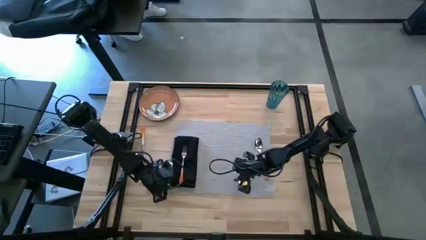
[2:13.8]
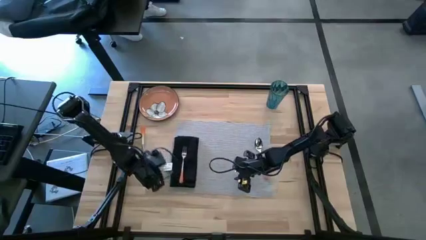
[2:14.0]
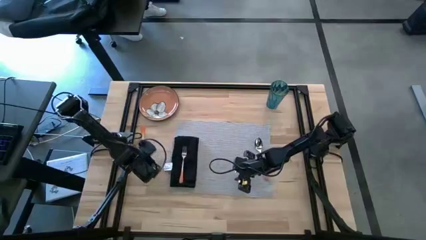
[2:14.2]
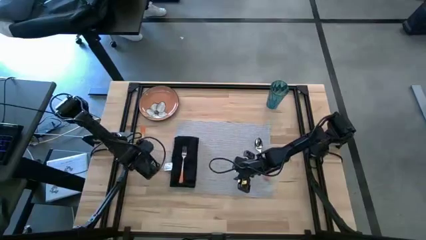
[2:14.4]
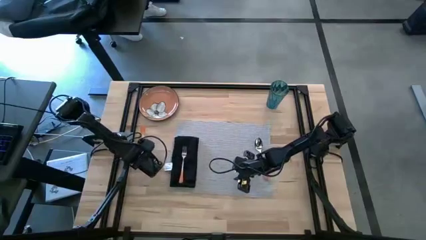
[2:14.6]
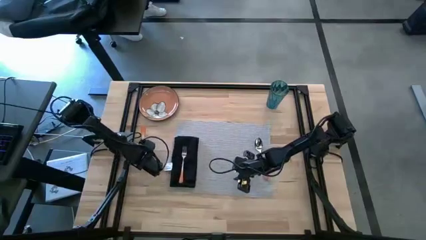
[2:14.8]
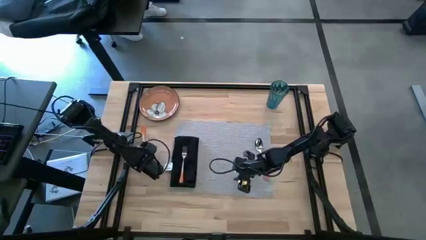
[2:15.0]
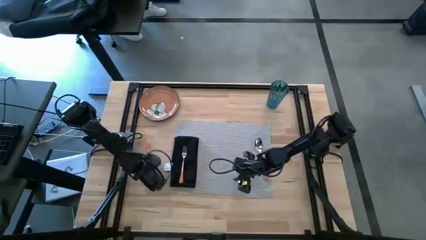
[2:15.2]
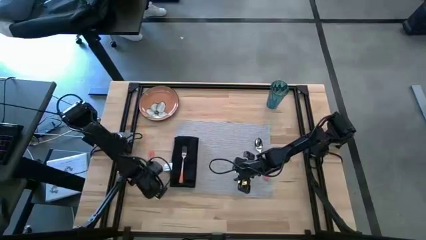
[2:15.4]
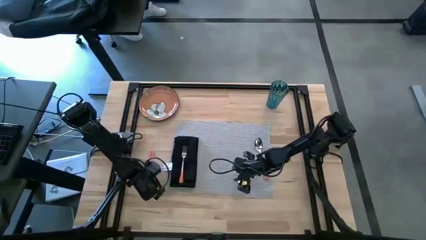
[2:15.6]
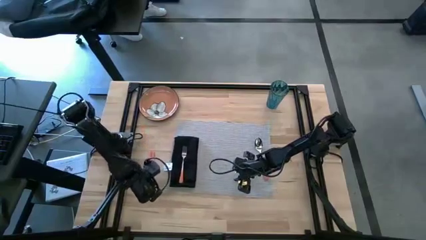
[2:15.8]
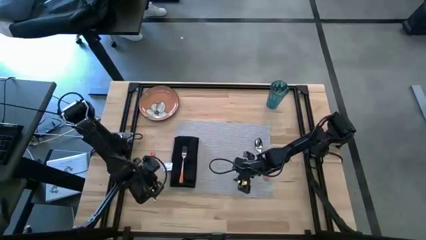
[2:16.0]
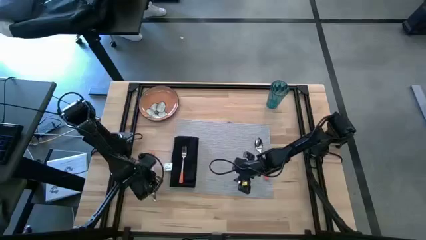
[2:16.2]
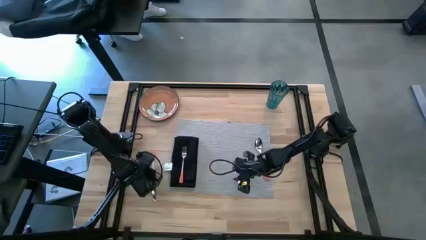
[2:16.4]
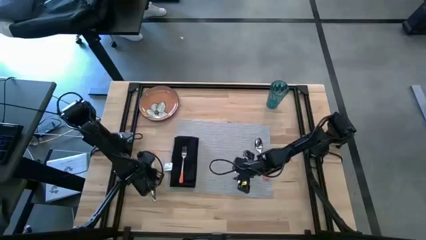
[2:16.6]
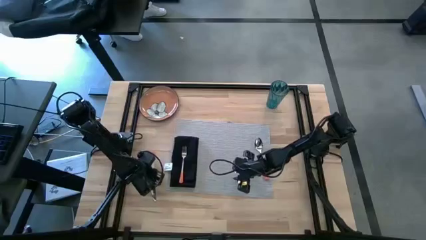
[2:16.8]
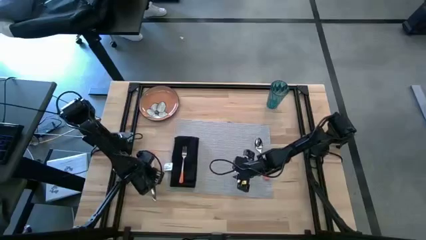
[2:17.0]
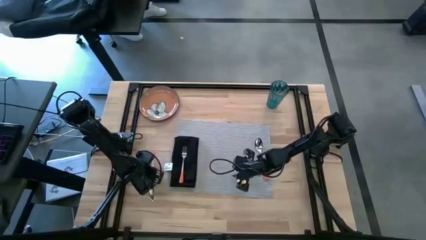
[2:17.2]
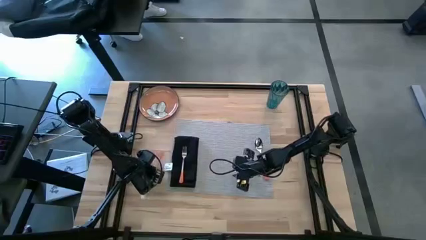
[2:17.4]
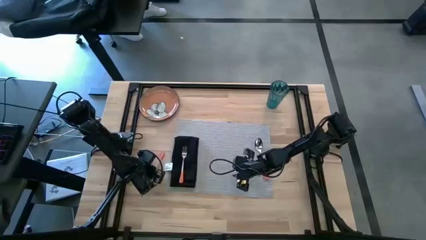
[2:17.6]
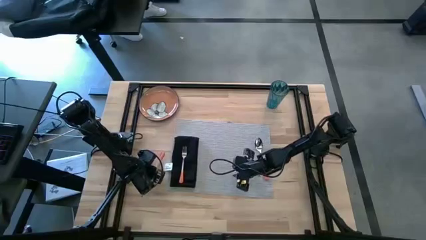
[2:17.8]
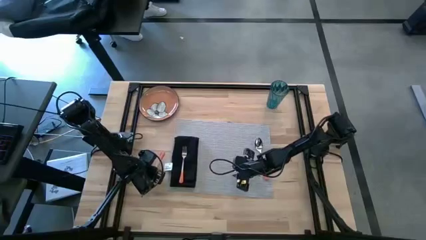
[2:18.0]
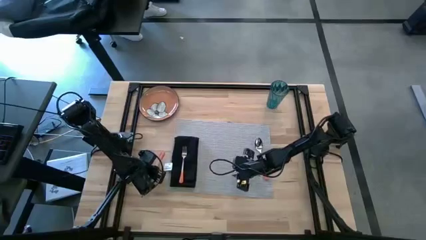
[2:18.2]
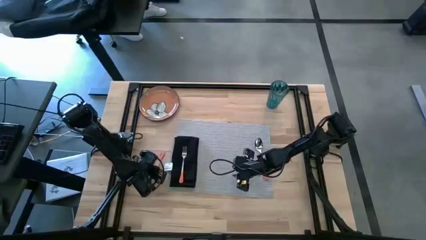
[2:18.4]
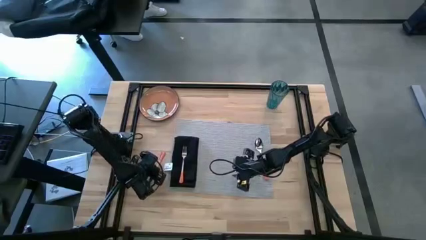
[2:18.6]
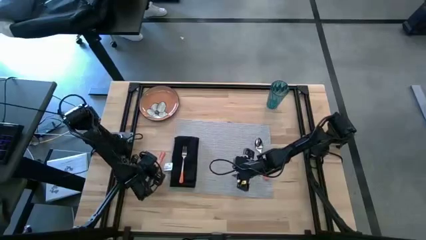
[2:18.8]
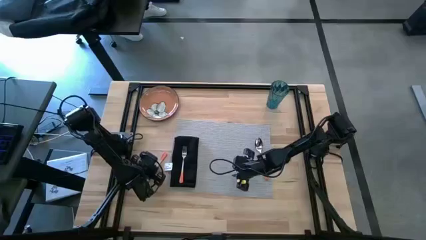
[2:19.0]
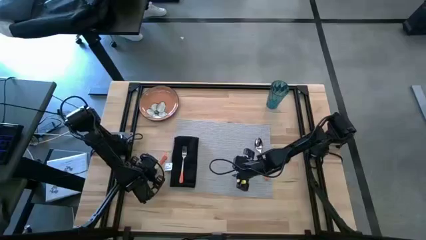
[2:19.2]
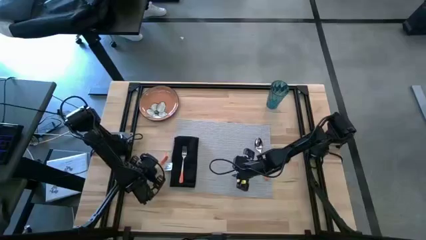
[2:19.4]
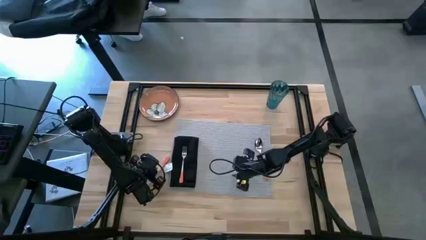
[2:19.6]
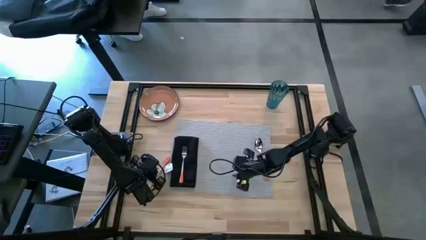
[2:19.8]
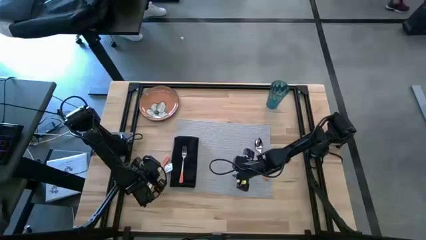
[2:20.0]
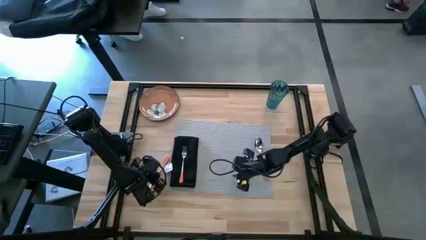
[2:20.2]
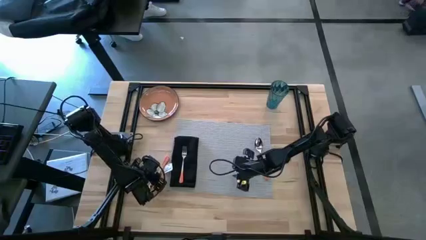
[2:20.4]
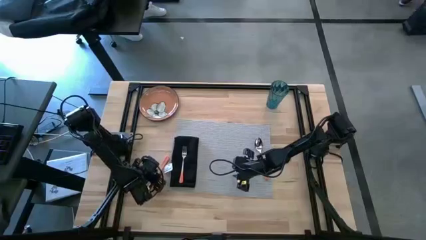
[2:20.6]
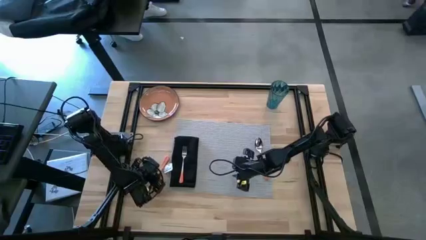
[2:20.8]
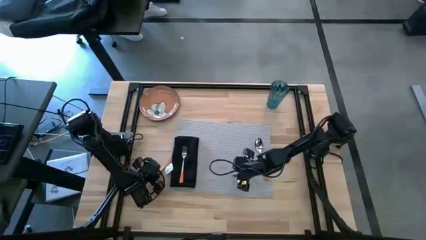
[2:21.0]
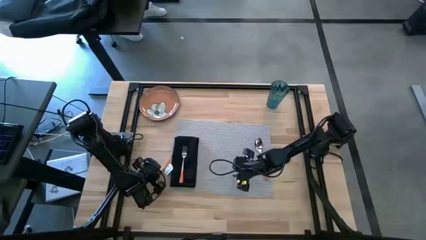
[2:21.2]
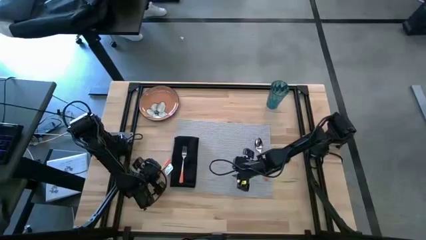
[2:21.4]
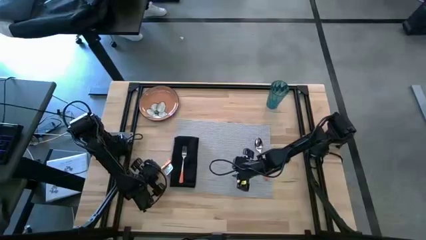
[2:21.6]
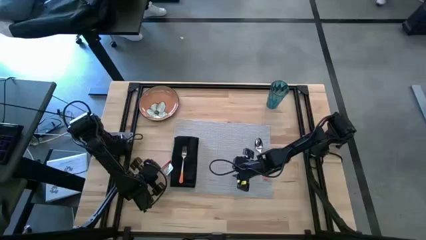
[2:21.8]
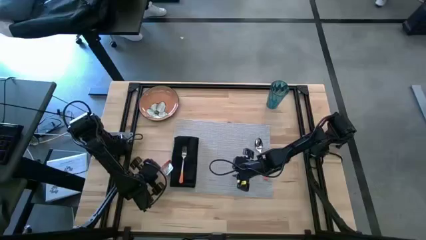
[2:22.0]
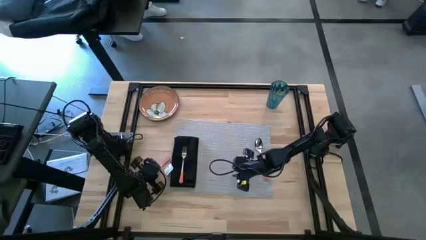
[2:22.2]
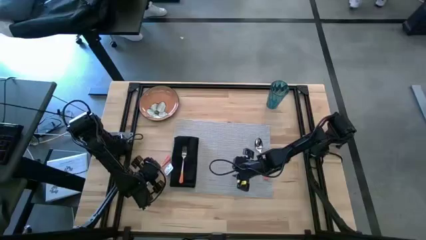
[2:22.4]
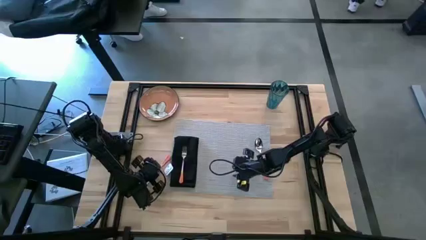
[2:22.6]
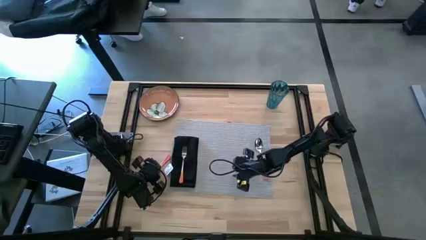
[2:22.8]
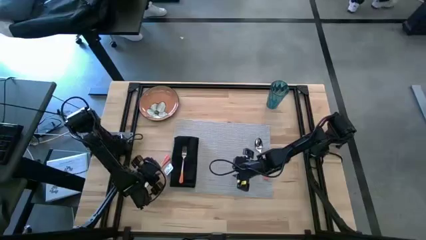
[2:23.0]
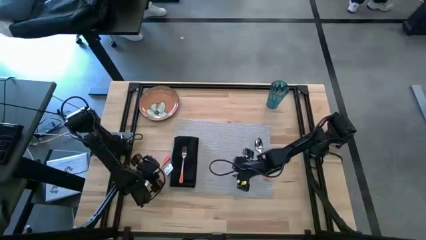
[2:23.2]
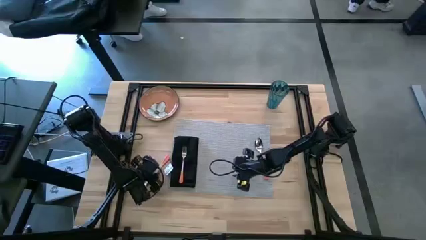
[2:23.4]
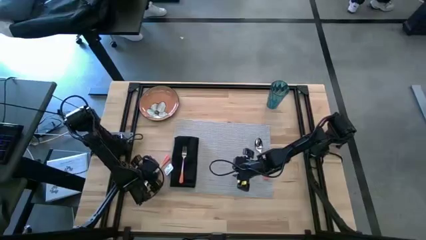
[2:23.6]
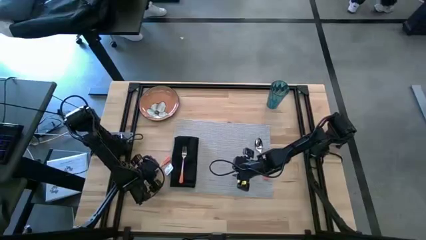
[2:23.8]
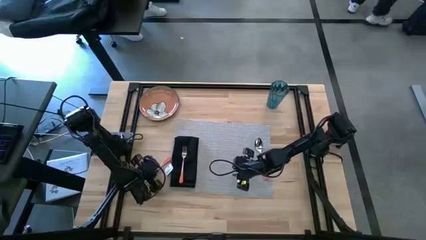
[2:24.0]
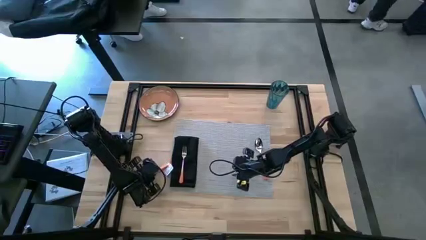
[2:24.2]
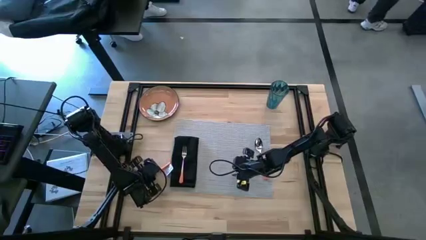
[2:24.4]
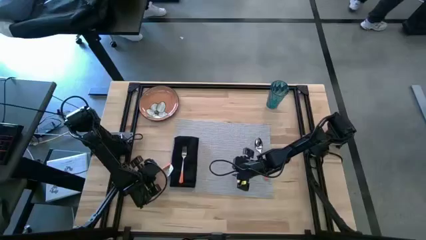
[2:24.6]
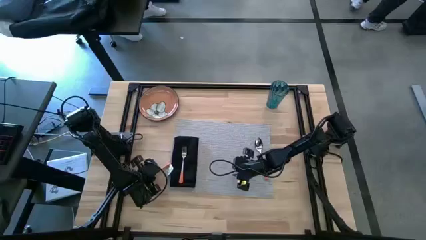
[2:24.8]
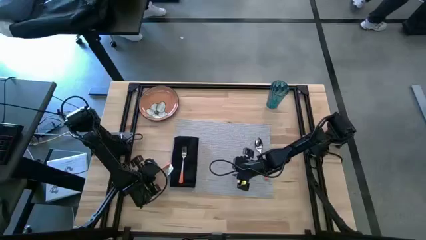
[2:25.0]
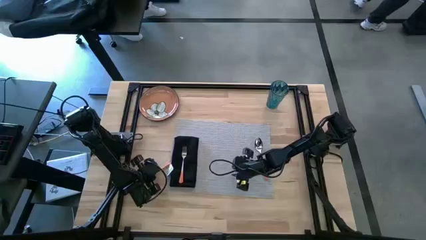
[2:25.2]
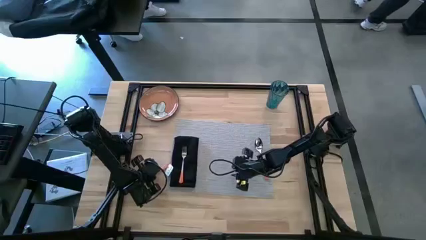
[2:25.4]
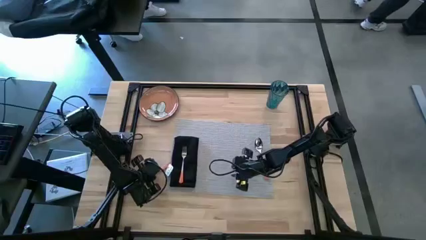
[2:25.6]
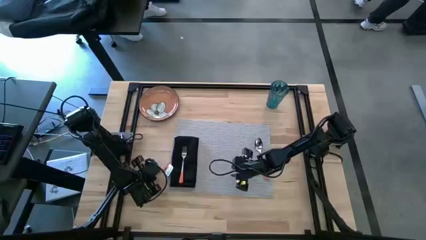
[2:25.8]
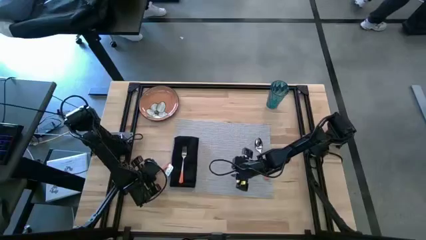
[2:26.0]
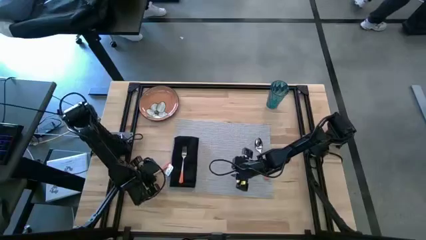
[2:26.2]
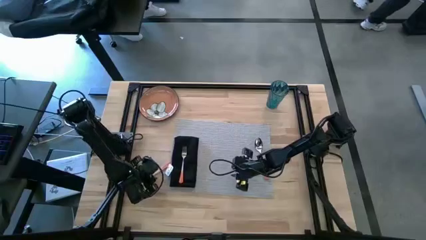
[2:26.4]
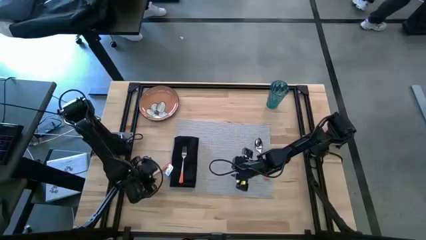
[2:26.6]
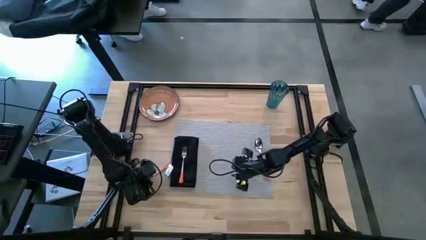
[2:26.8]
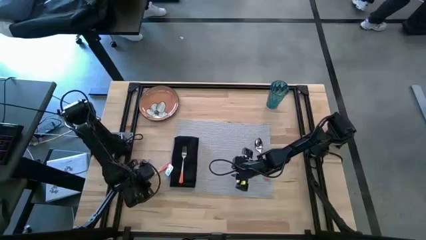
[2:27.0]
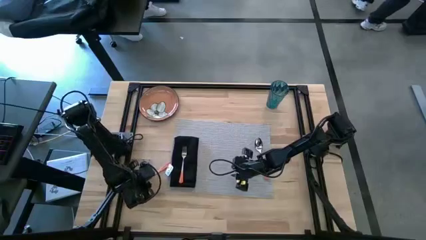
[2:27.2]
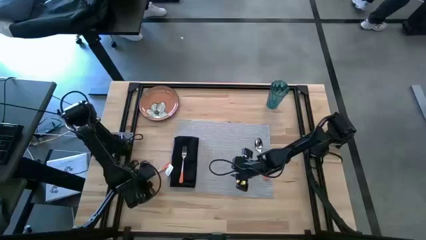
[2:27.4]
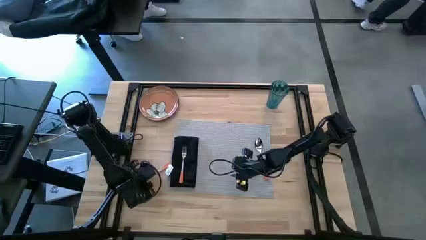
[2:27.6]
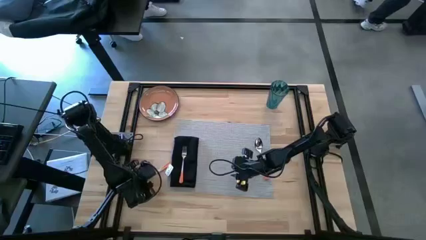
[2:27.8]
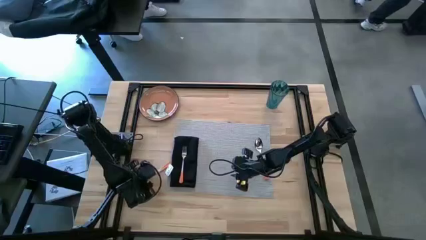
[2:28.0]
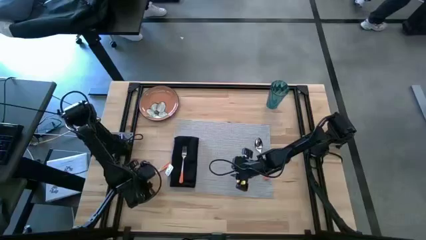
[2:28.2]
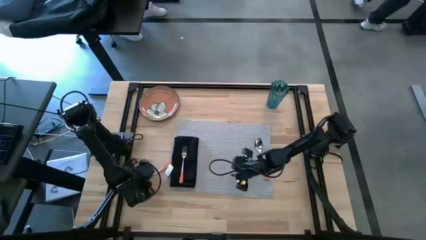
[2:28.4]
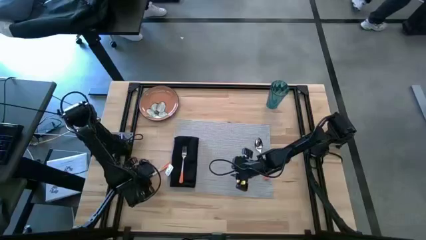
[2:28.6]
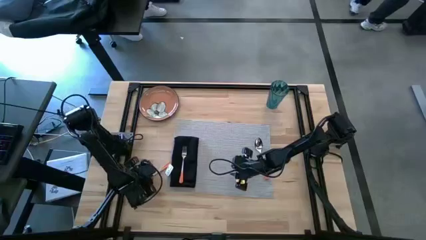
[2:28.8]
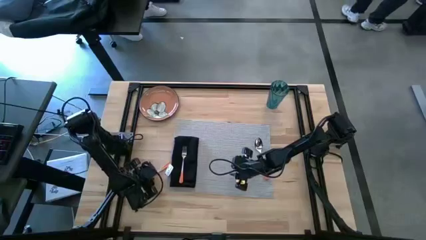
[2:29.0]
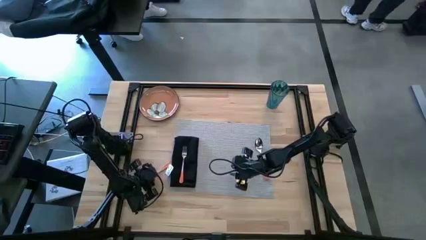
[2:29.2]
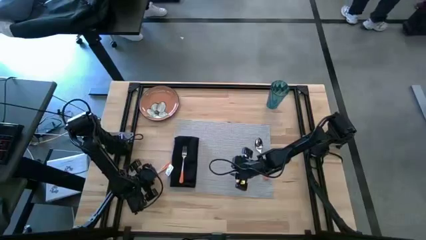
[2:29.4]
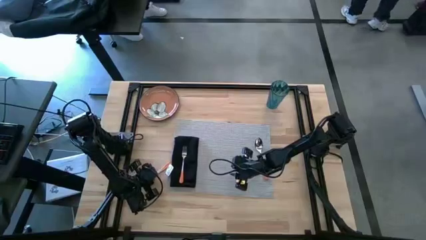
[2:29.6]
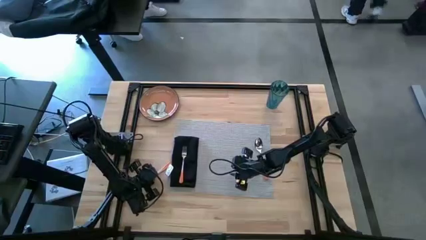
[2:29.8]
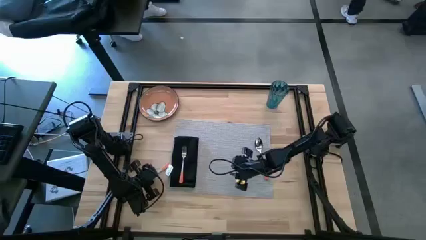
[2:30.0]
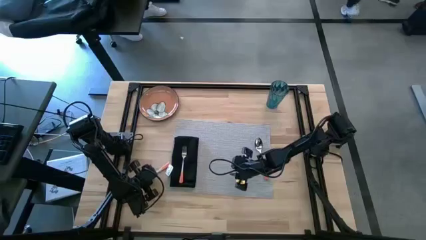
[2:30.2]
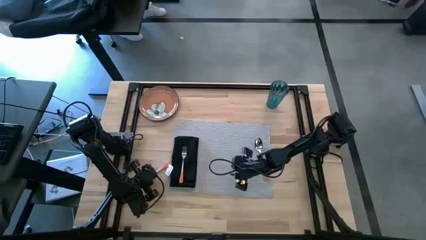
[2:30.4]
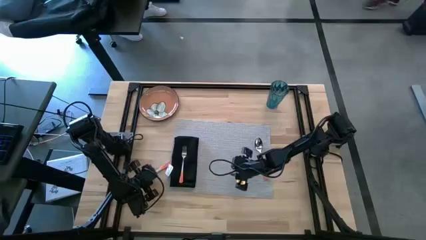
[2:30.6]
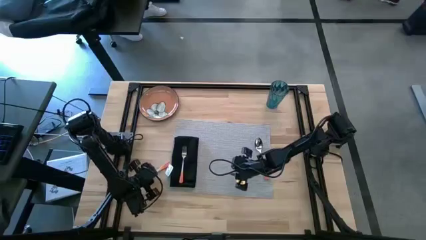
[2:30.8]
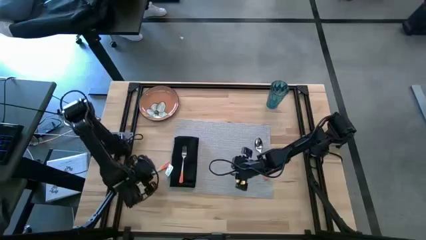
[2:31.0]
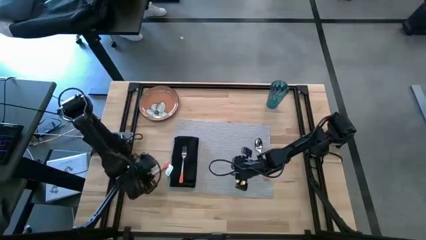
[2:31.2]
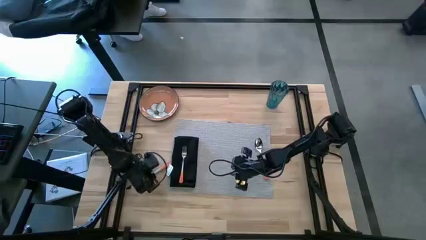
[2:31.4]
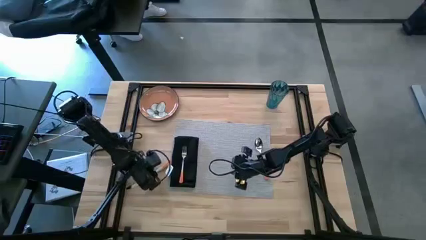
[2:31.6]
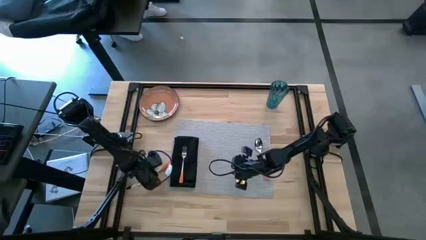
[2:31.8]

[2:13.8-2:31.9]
Task: Set table place
Put the orange table knife on the gray table mat beside the orange spoon
